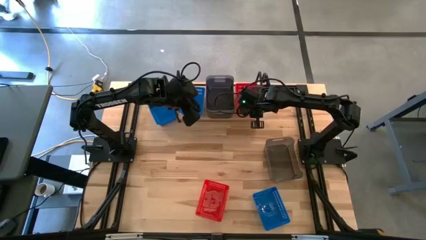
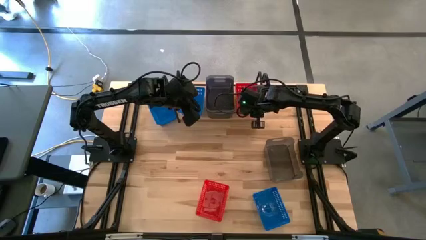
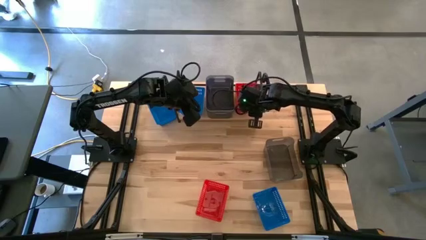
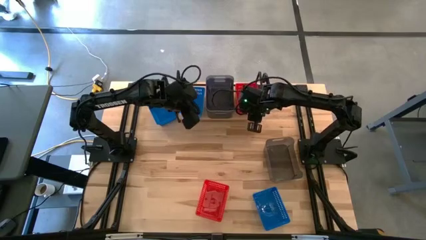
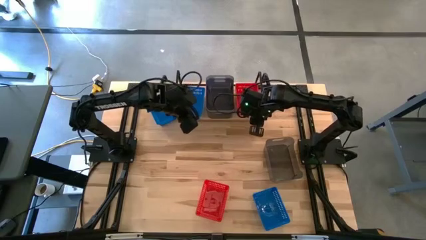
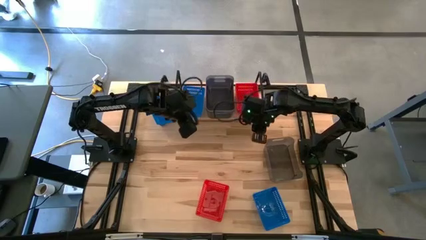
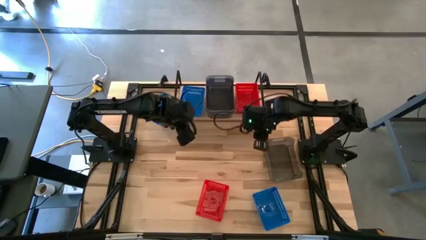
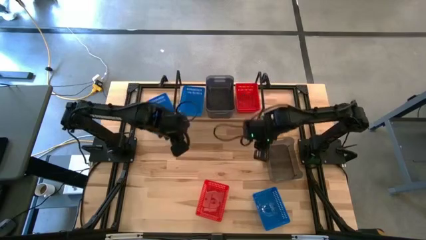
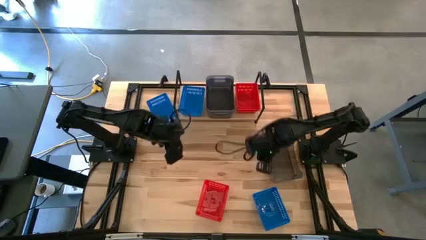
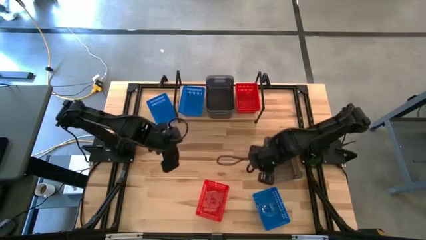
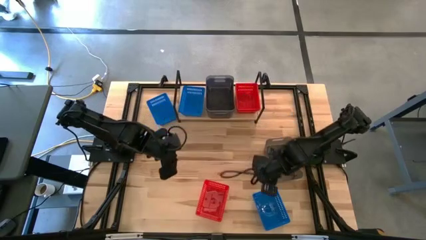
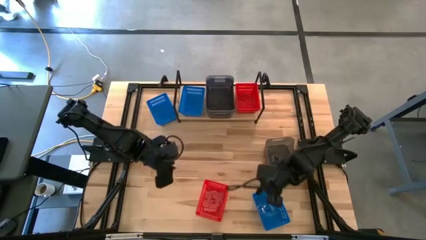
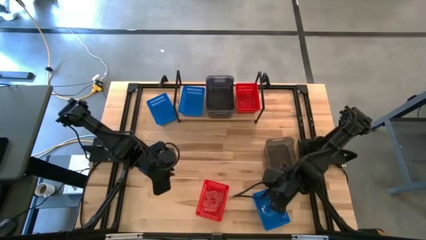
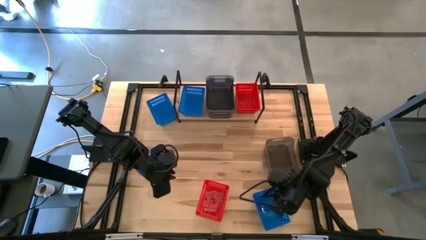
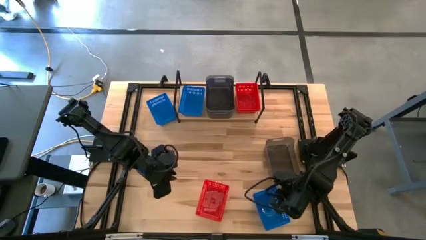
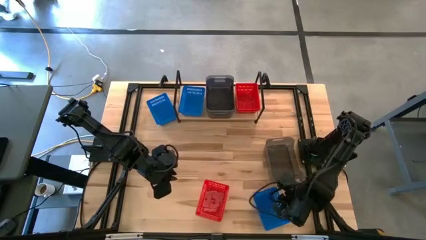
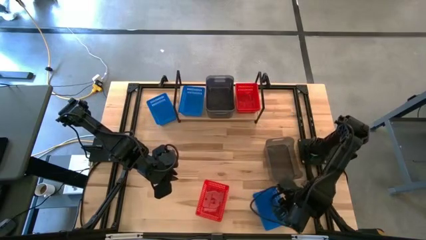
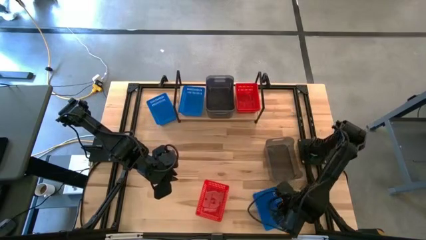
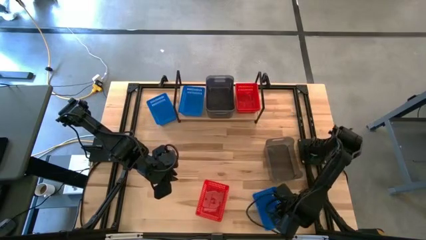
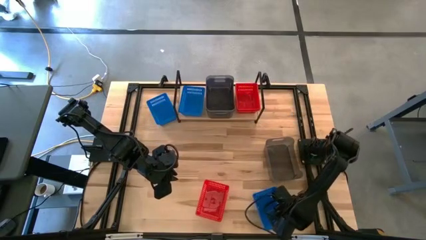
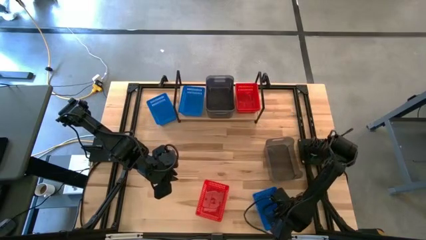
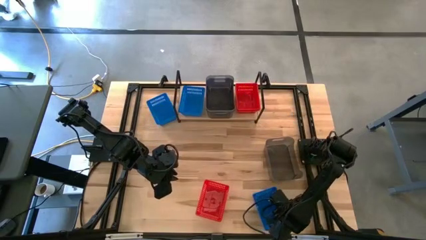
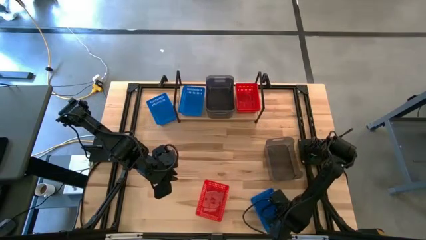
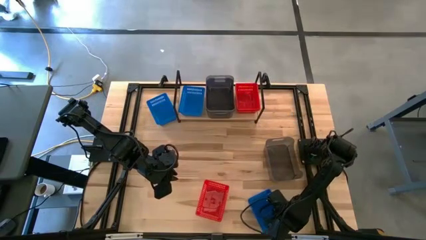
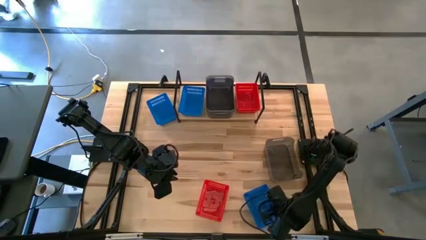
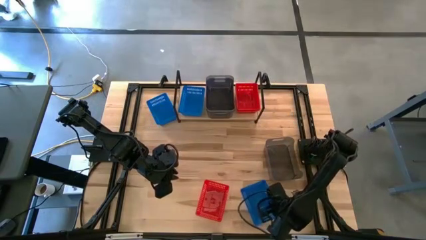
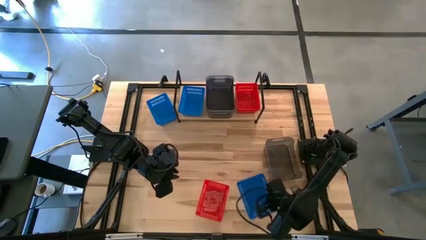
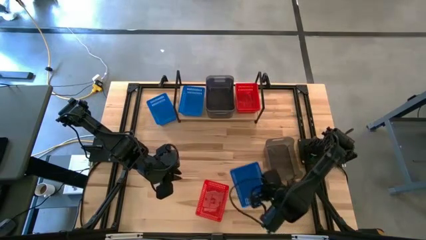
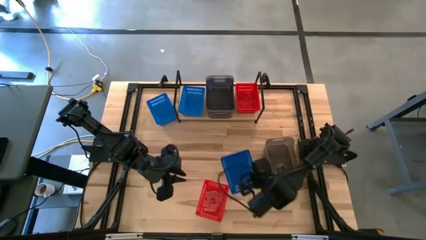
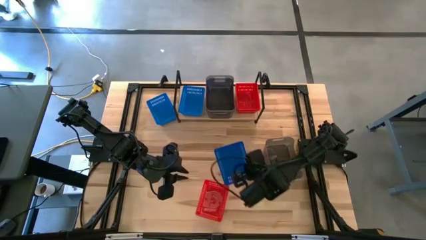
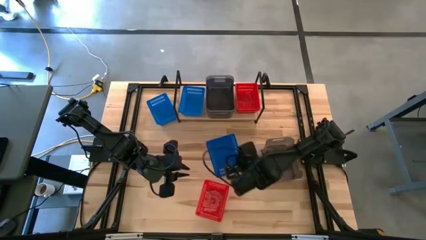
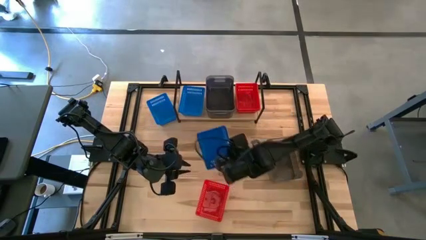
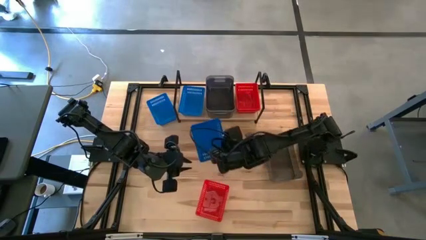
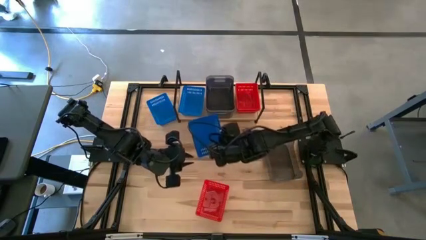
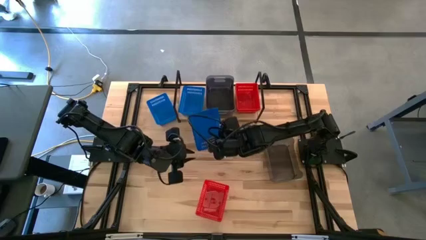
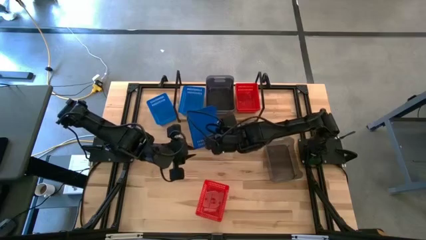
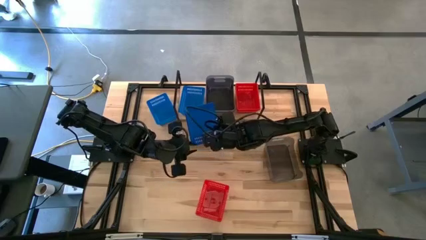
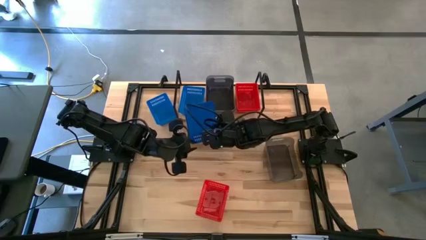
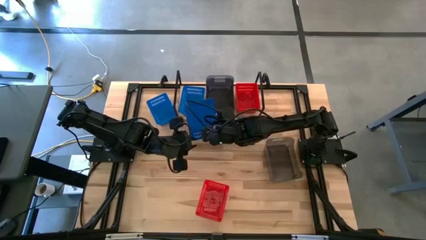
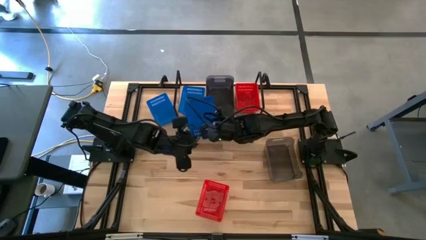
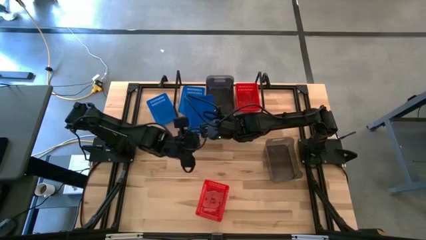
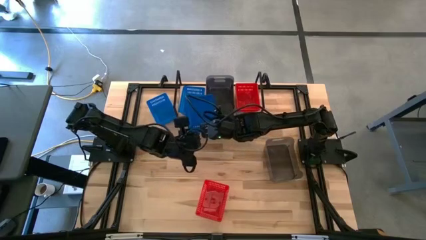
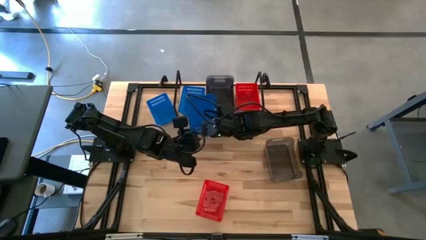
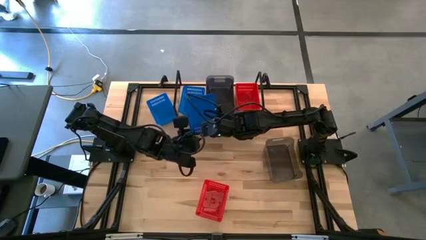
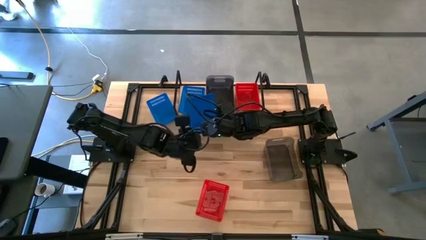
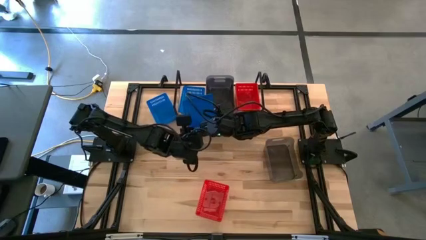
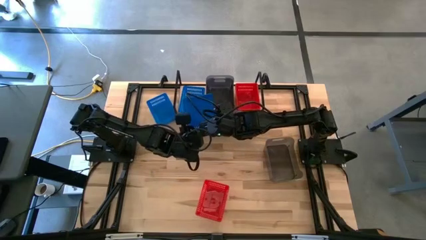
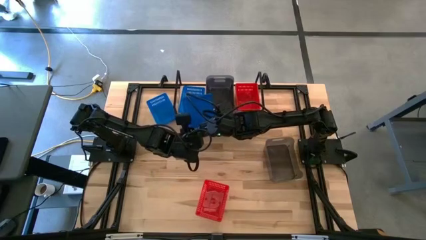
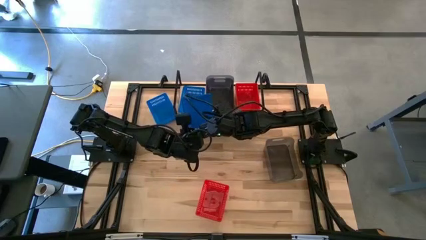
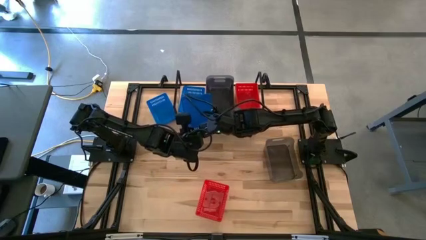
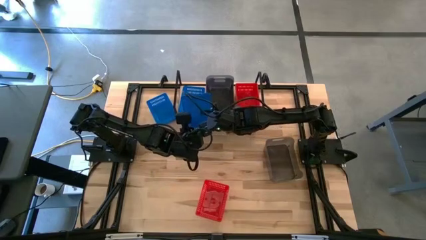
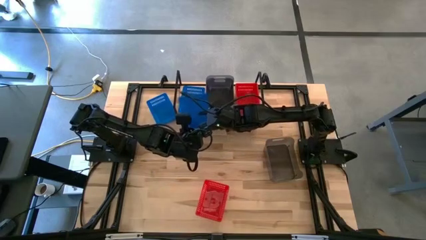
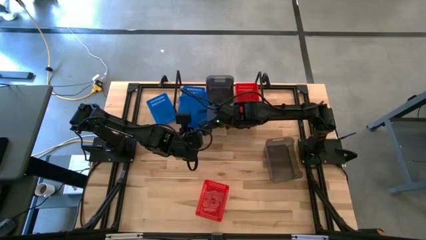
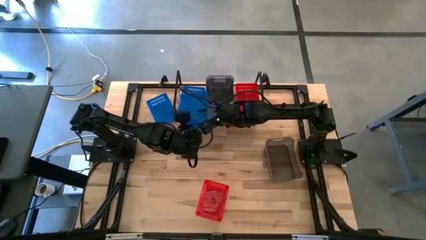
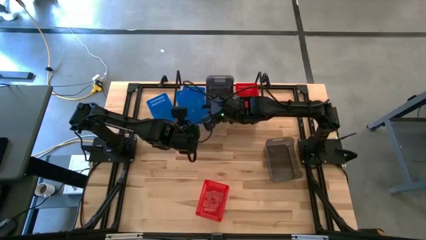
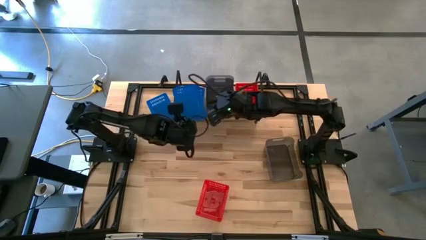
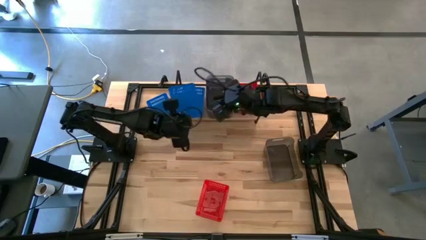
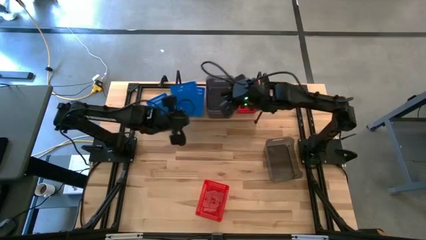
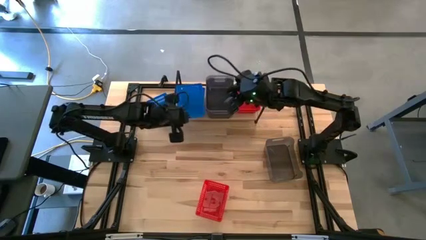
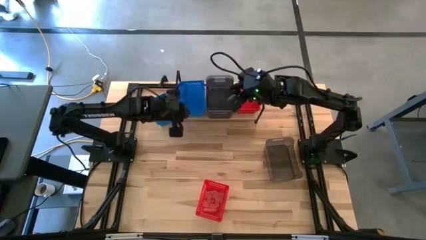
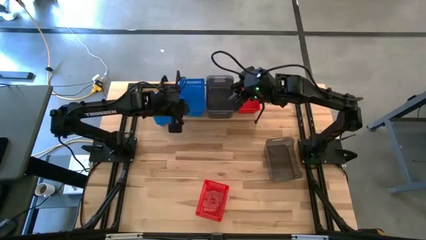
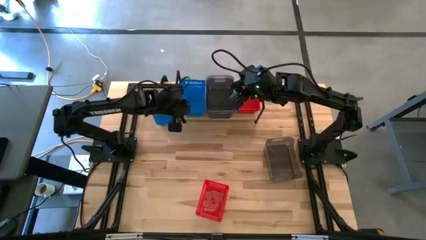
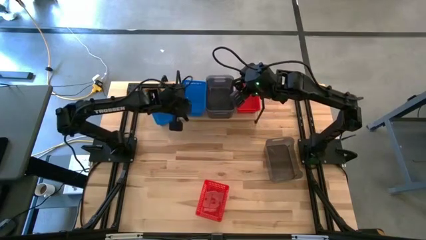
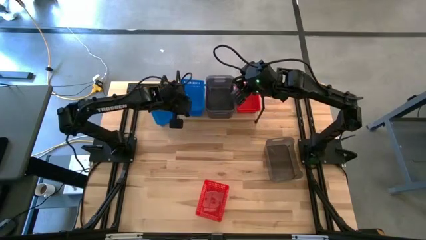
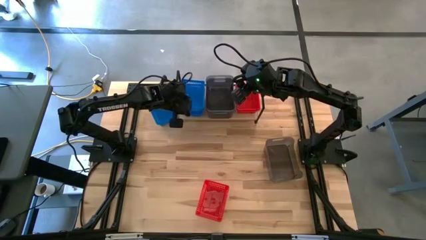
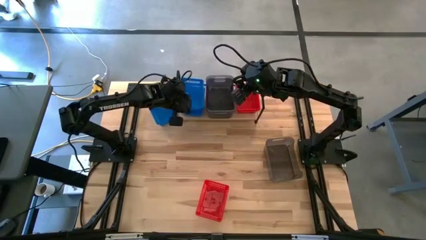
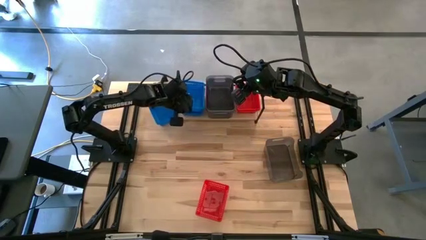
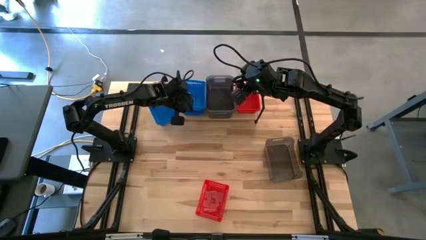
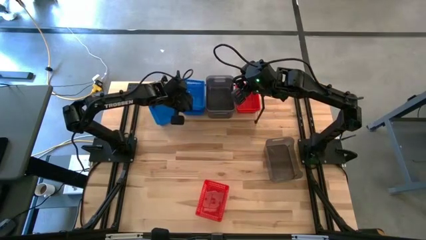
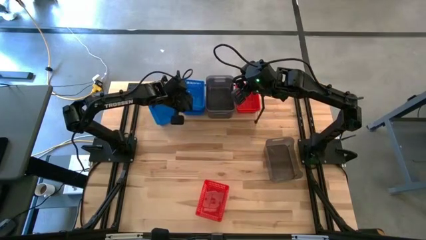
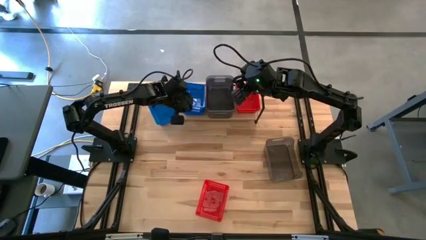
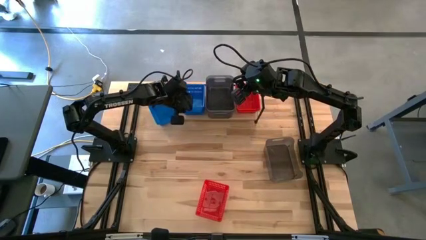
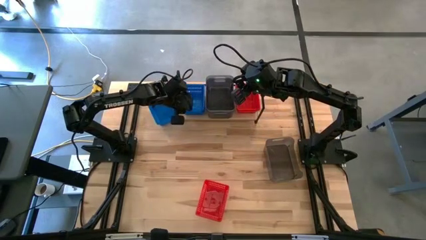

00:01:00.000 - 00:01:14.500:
Task: Stack baskets on shelf by color
Stack the bottom blue bin on the blue bin on the shelf
